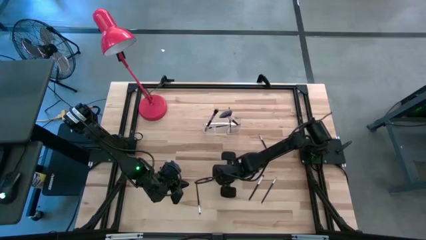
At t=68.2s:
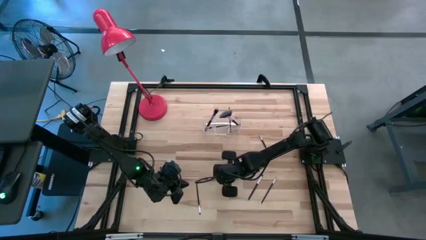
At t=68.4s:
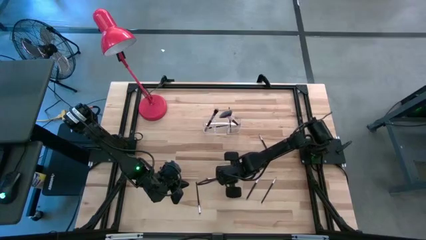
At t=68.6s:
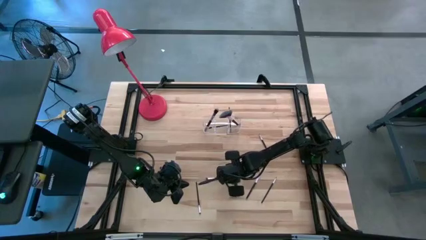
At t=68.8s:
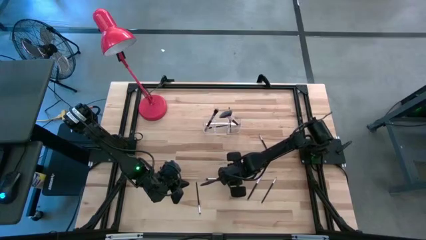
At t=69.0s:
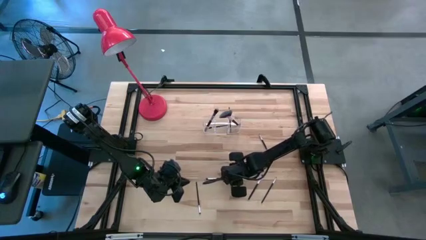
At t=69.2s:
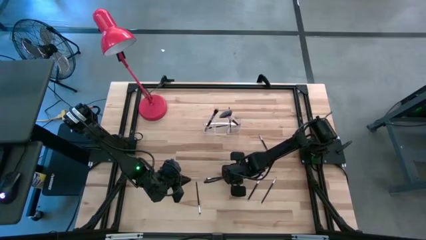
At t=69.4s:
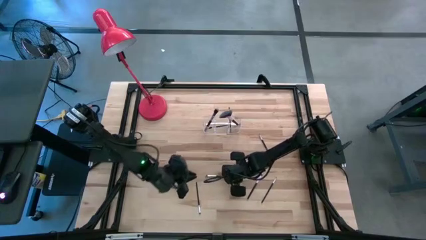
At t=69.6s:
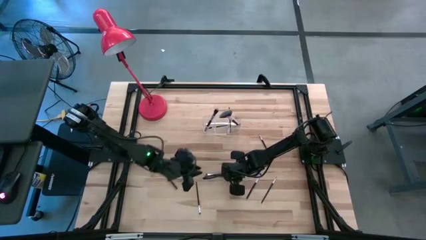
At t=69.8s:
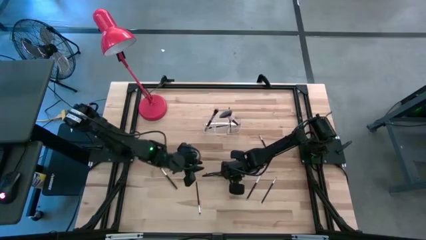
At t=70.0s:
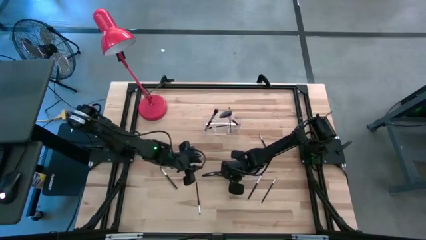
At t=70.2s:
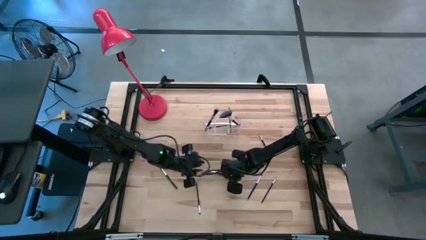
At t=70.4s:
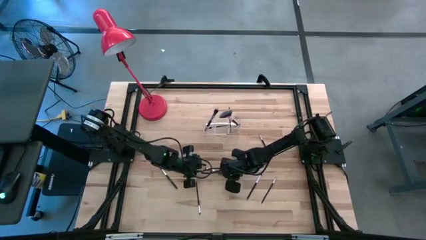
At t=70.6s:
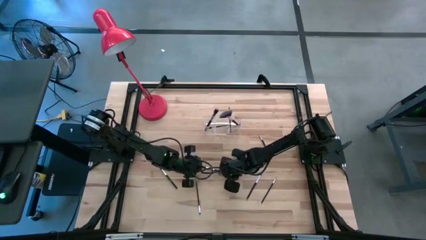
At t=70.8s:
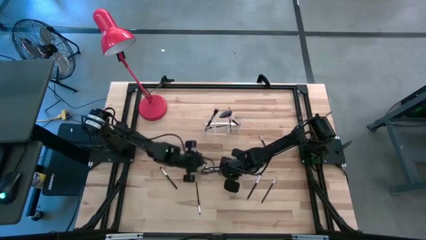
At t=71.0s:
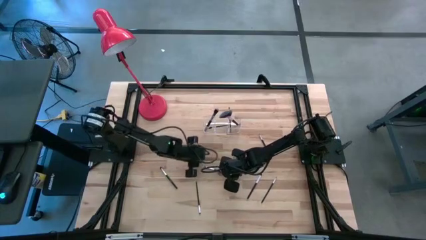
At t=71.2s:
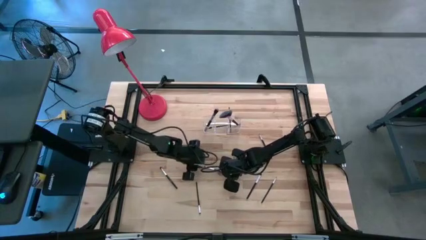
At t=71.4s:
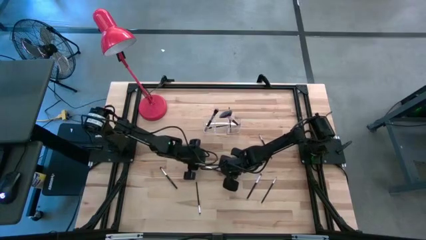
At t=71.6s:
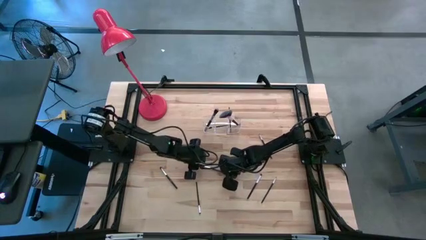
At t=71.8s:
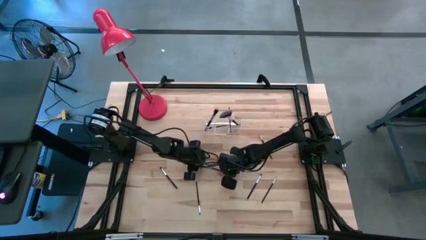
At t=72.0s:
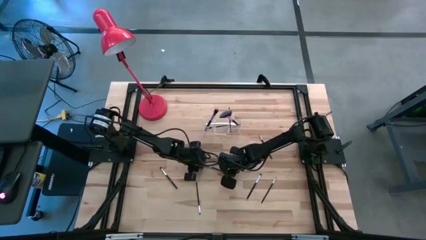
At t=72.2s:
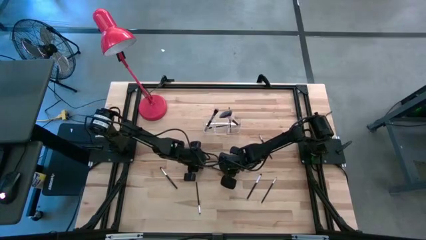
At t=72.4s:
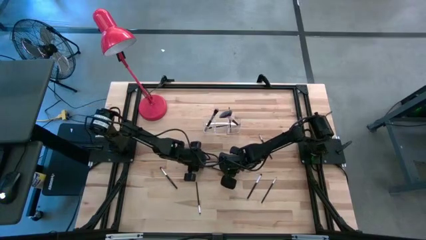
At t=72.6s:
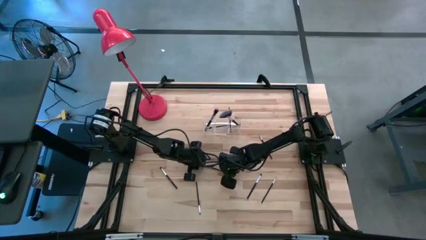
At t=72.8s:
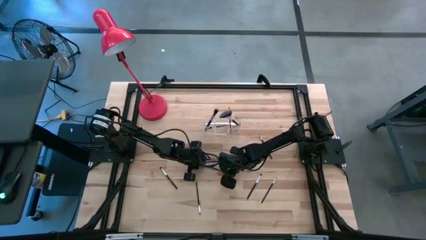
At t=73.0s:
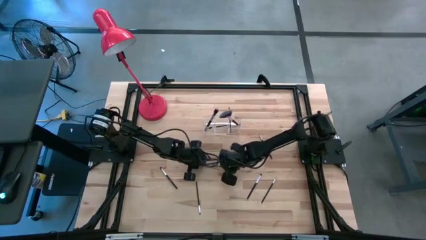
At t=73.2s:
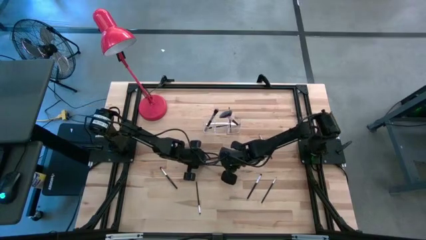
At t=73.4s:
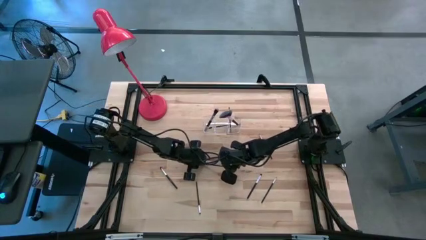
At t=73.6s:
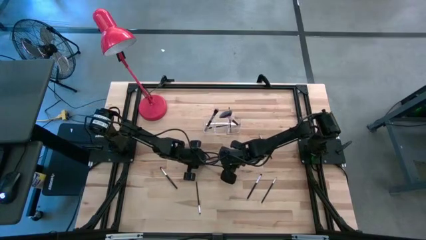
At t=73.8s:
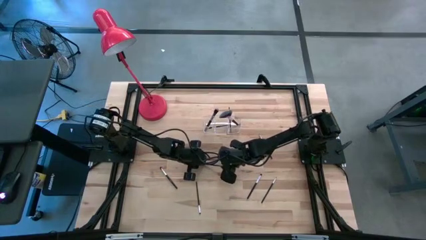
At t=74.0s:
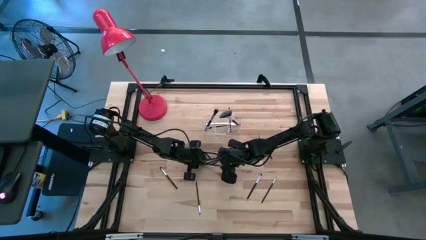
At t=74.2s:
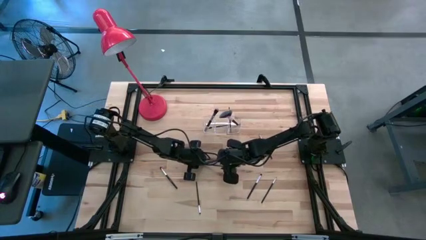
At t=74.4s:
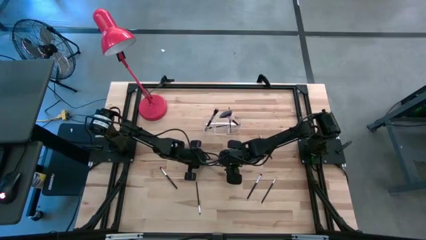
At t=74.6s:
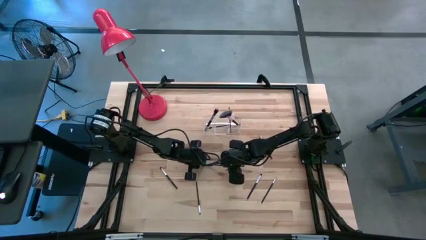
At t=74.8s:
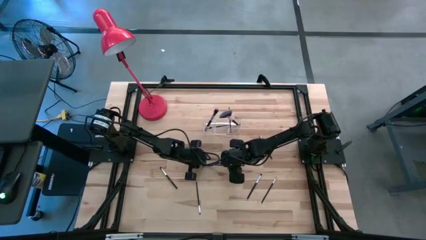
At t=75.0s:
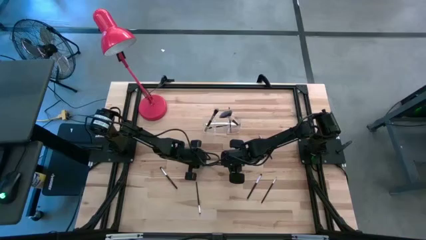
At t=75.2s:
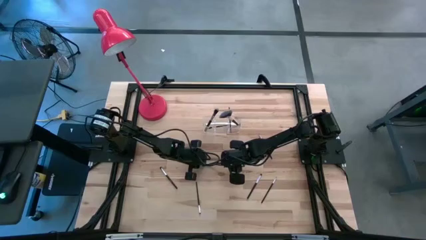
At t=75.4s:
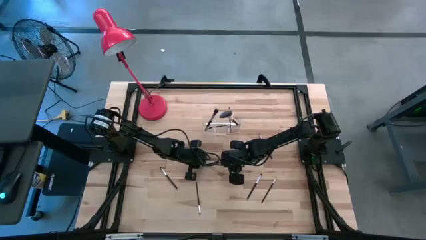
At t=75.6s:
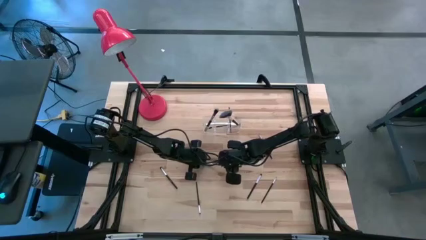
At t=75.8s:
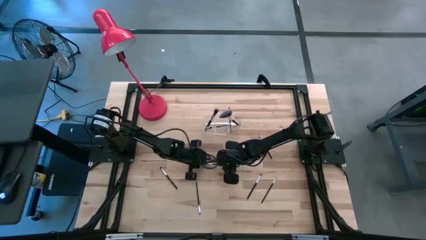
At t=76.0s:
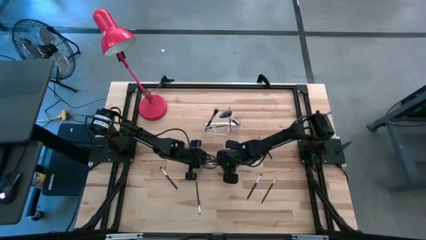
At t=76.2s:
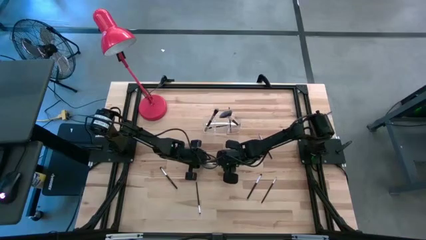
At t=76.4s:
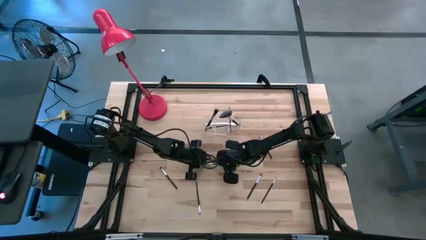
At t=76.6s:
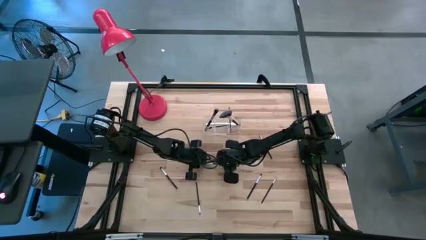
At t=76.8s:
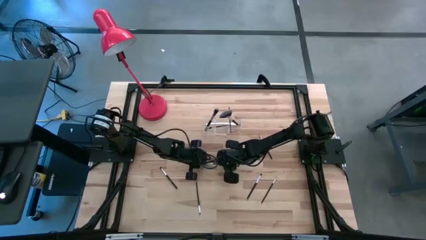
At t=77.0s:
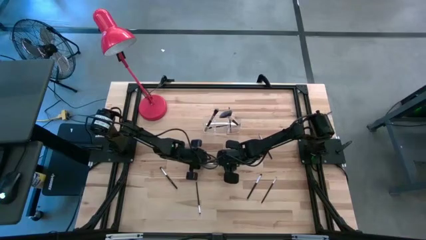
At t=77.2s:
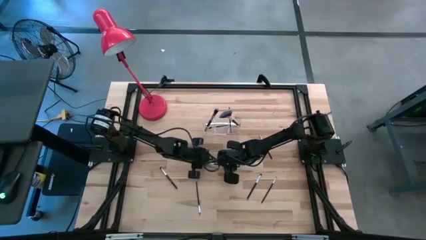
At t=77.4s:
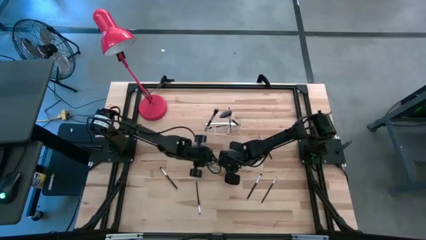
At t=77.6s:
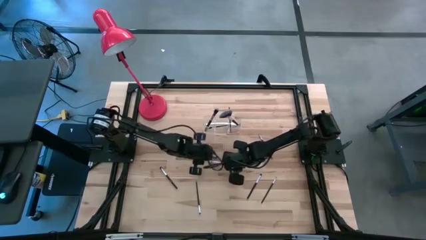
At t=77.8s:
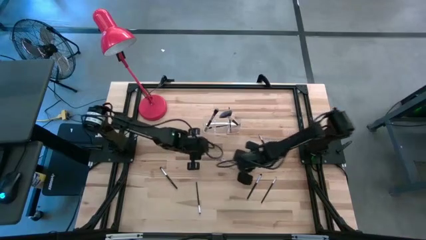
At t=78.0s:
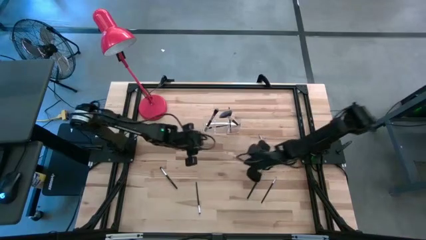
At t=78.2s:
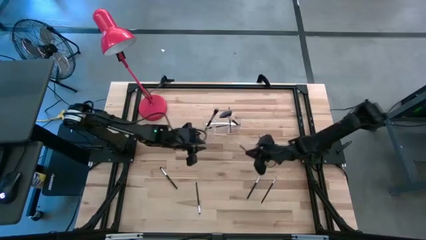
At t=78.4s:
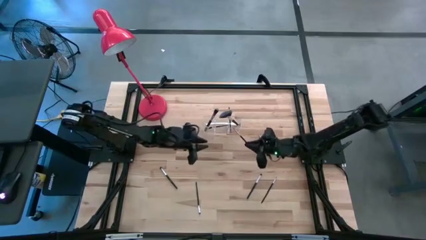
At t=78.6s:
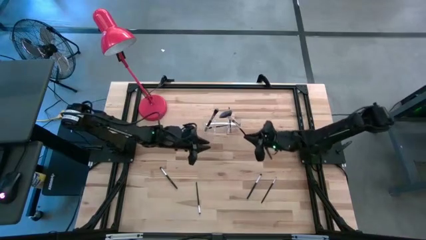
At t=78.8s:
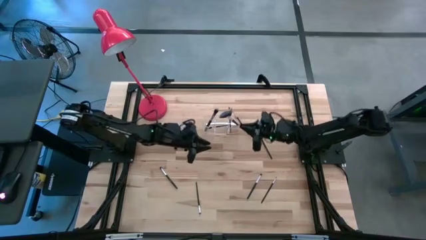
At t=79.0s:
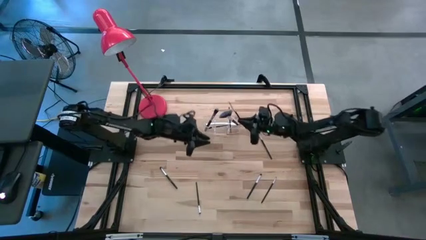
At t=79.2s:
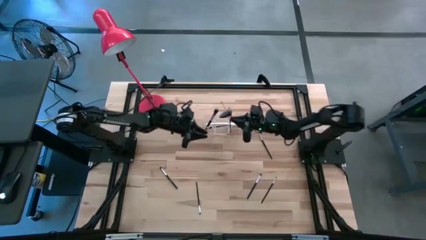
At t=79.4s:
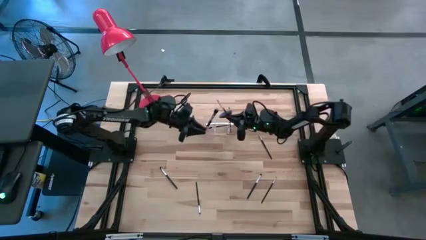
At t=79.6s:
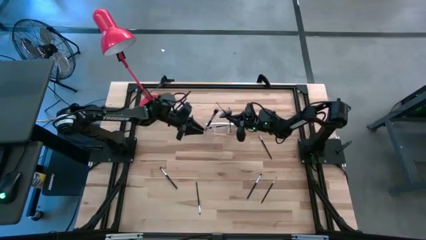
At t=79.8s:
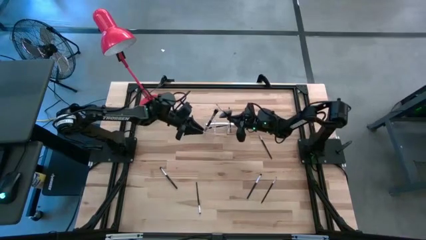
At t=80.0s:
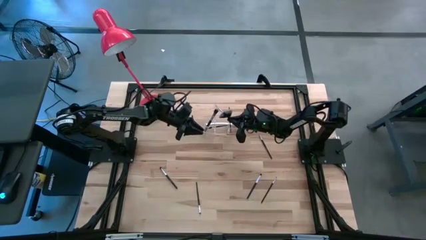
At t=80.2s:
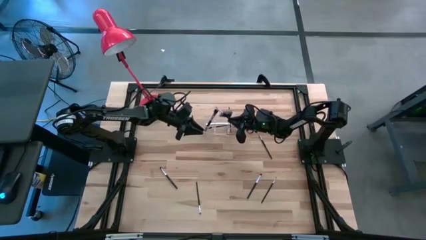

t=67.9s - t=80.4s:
Task: Pick & Place Makeup Supplies
Put the makeup brush into the transparent organizer

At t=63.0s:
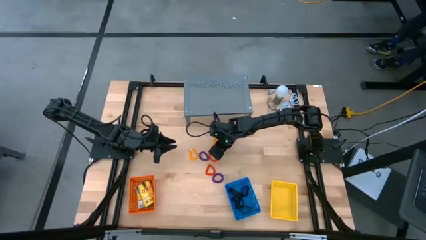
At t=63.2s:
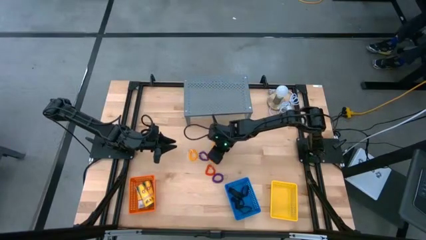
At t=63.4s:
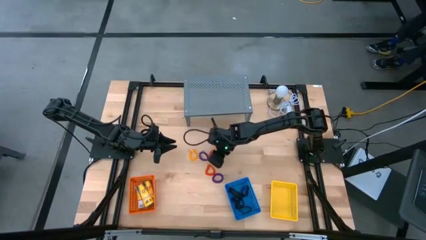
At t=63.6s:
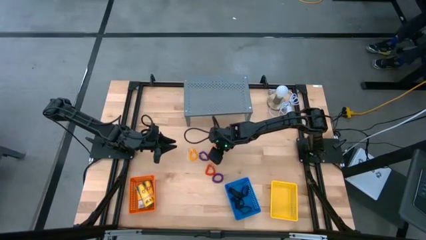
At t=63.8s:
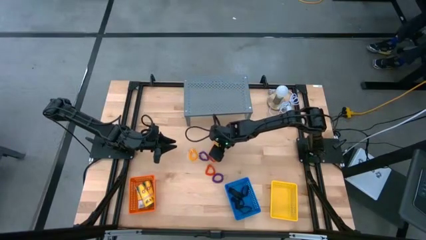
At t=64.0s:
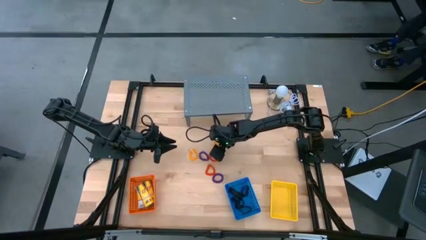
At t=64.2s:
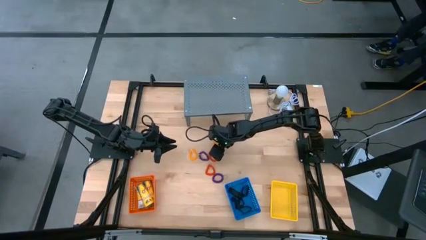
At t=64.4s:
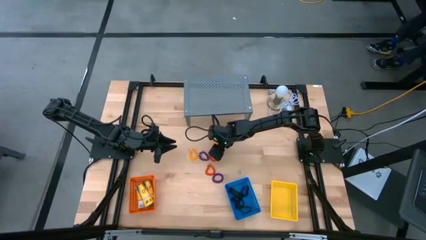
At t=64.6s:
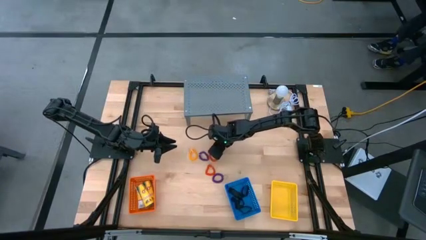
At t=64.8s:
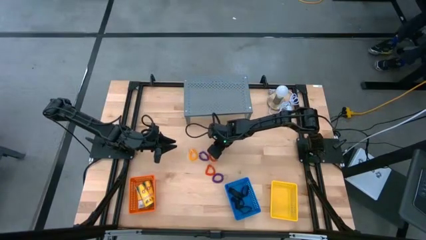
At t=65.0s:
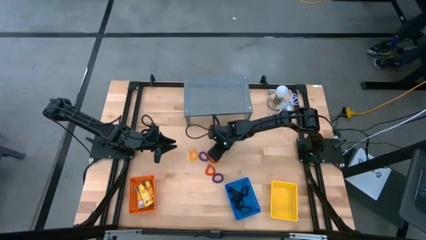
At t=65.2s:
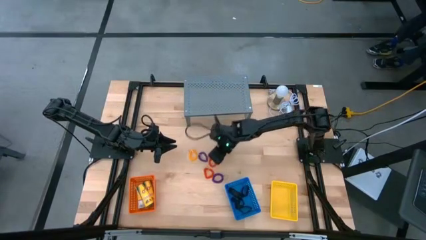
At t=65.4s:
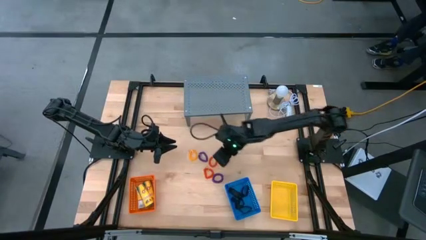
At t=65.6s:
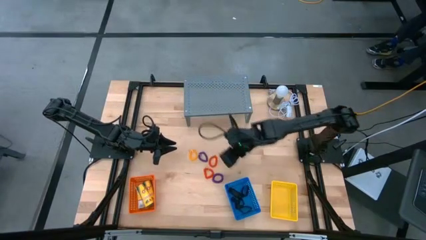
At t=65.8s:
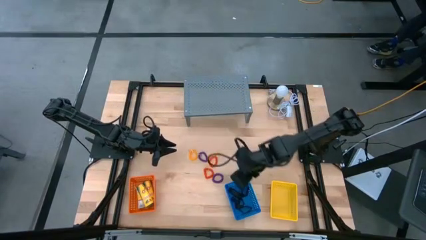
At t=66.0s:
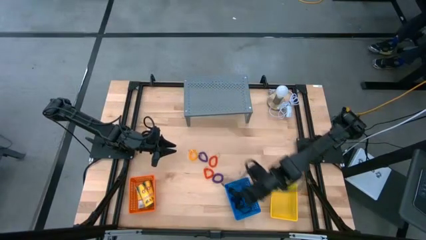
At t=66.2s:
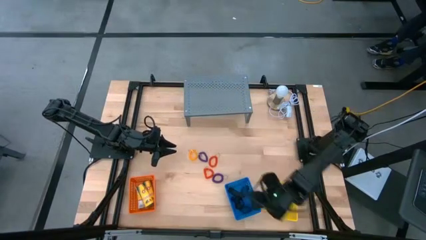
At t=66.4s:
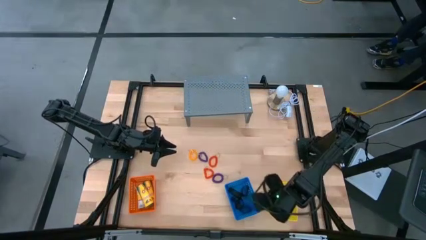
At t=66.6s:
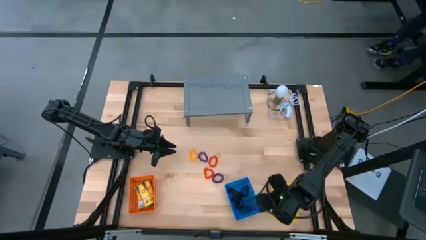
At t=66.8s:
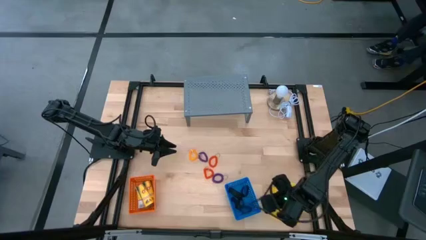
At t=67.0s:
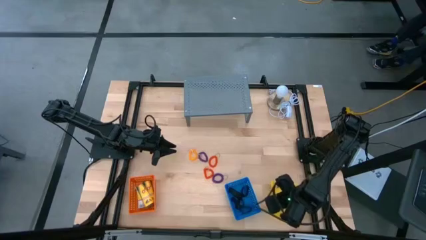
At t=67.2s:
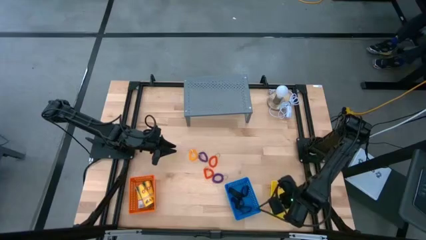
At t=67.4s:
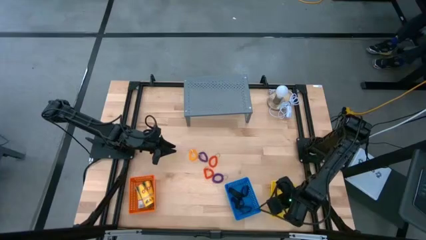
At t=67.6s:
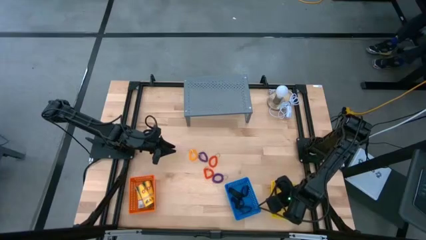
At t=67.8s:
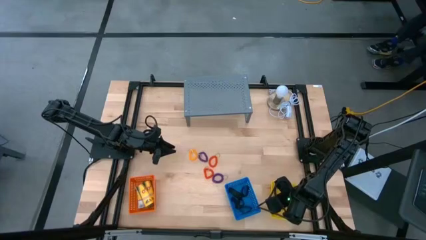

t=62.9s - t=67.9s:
Task: Pick & Place Office Desk Supplies
Put the yellow spring keychain into the yellow bin
